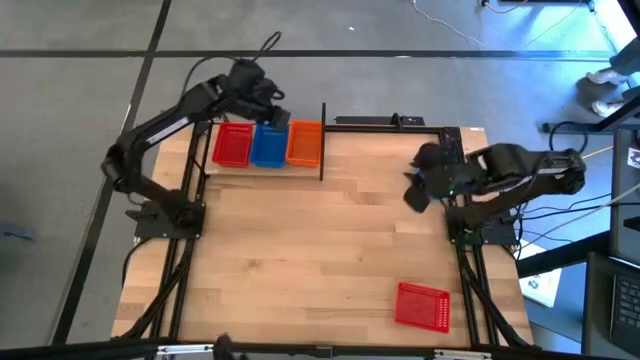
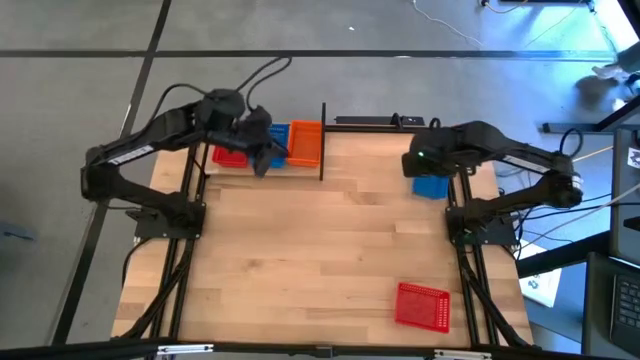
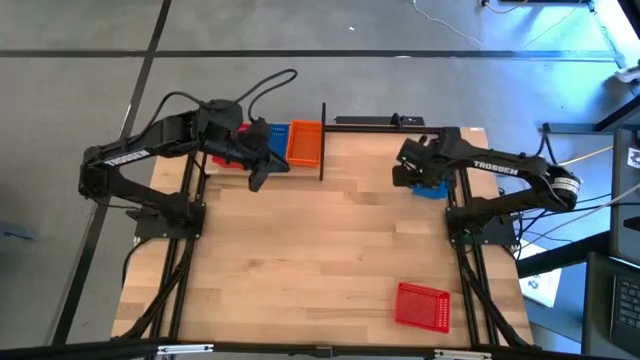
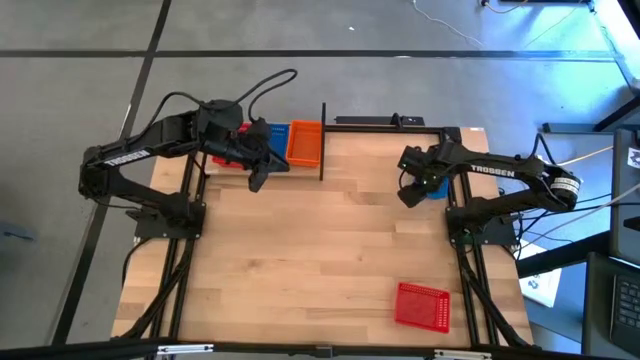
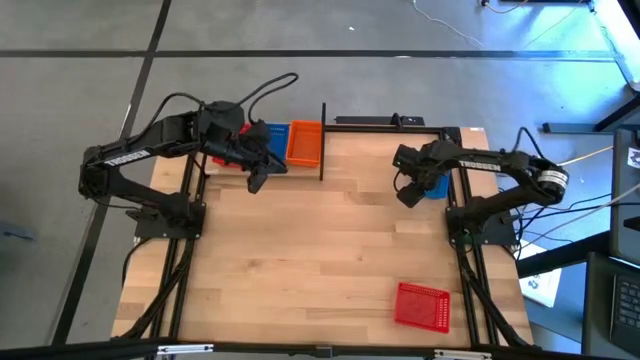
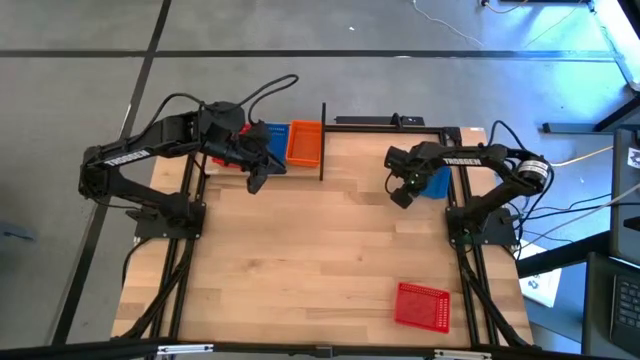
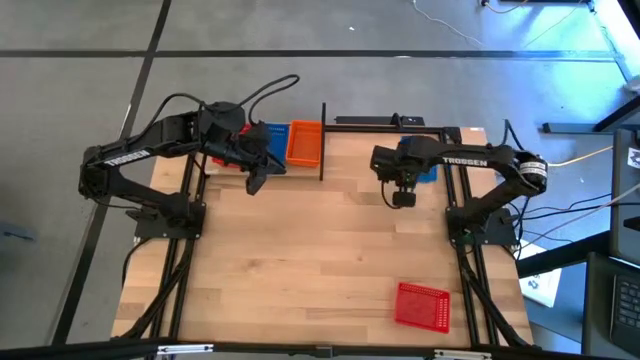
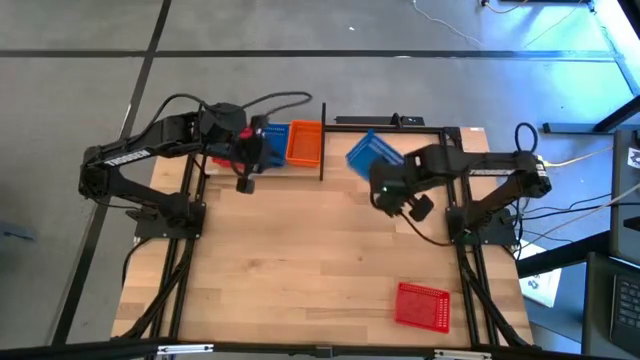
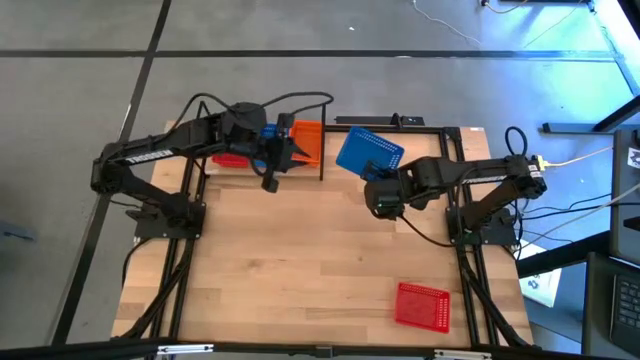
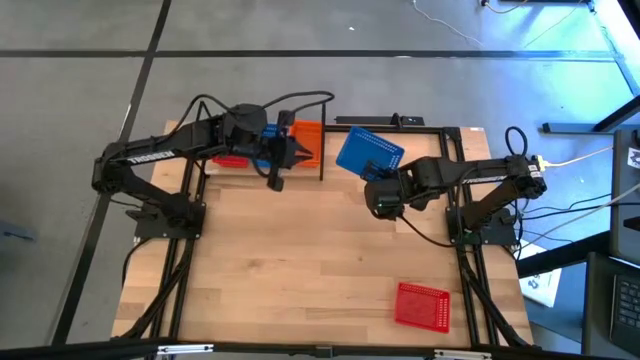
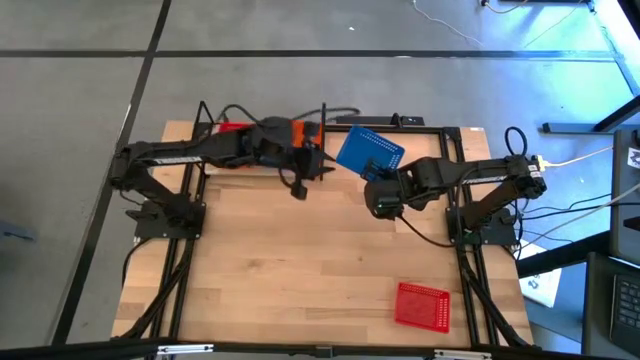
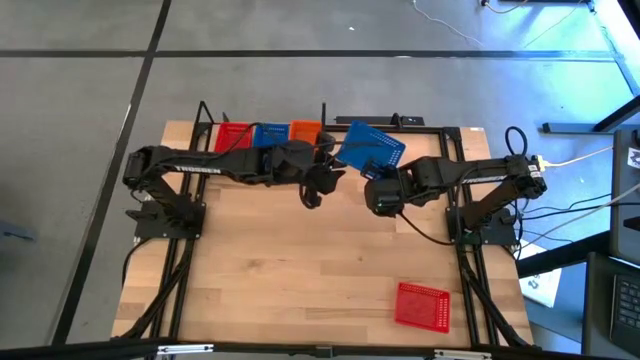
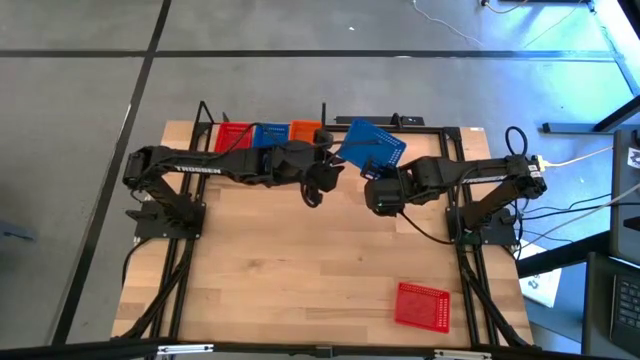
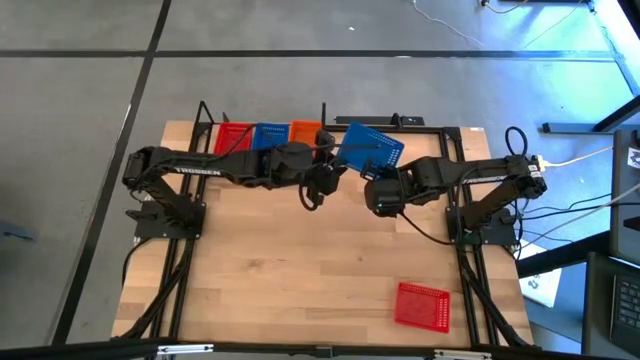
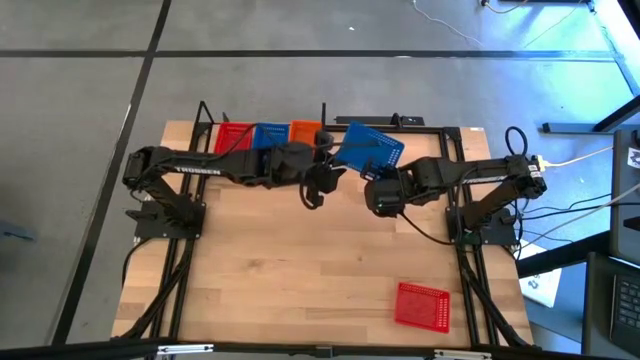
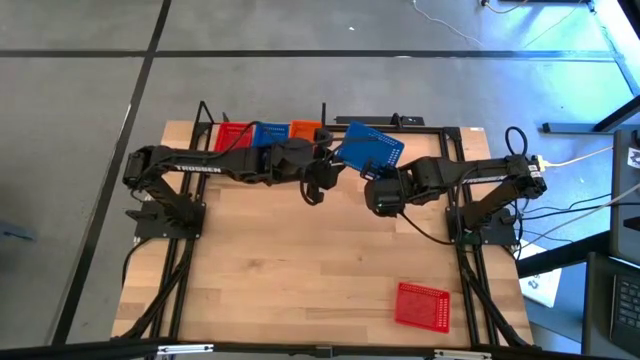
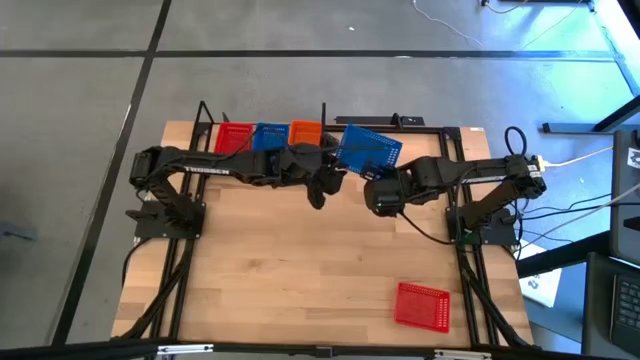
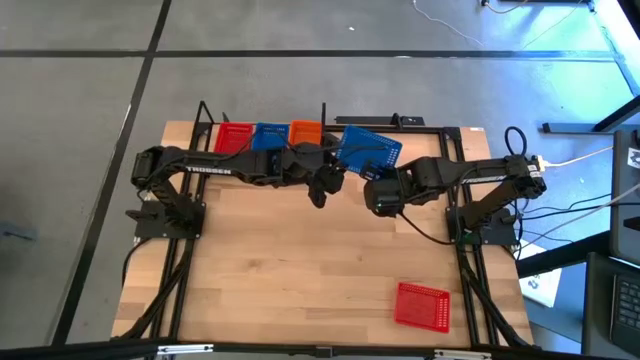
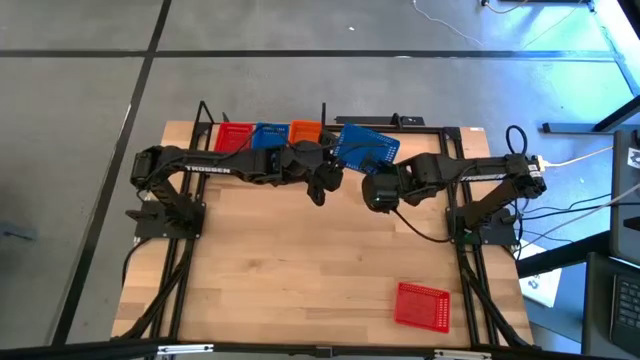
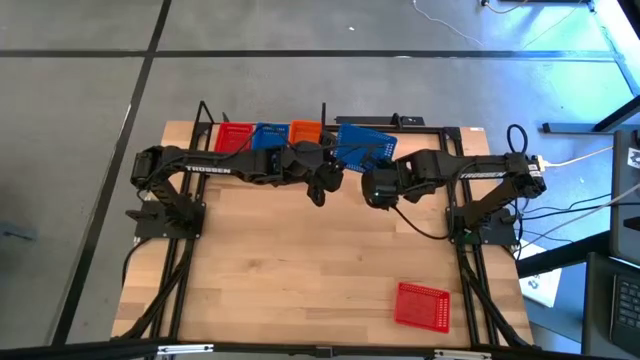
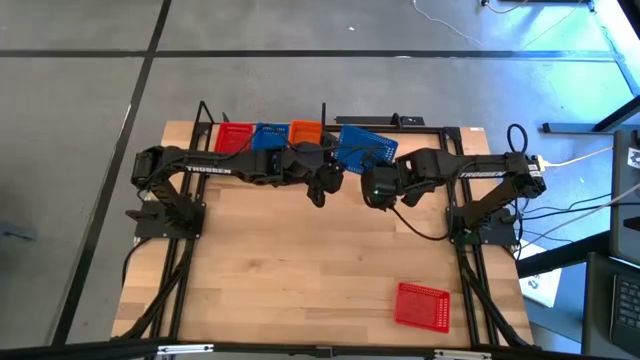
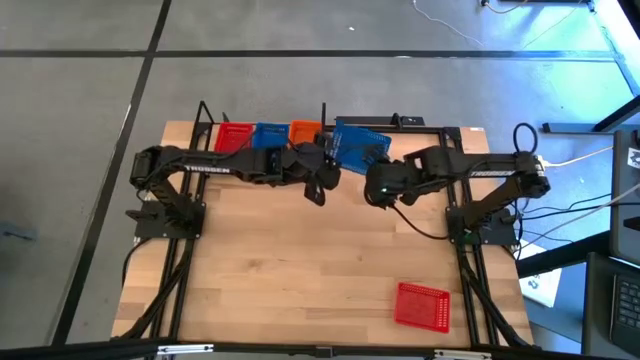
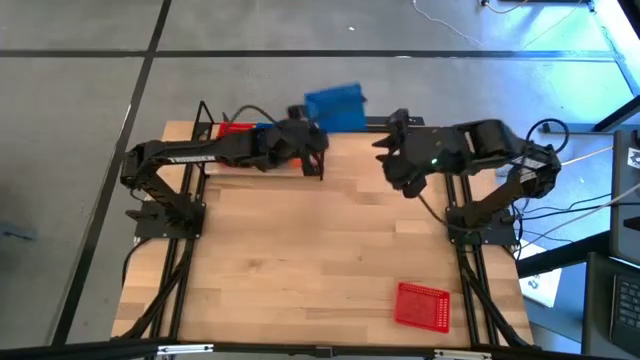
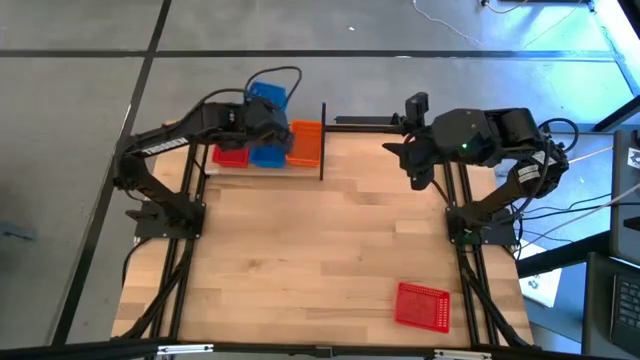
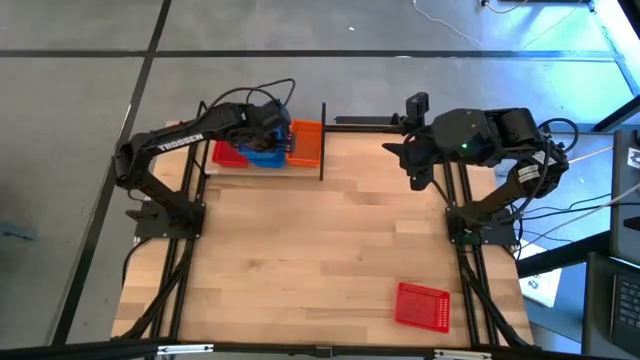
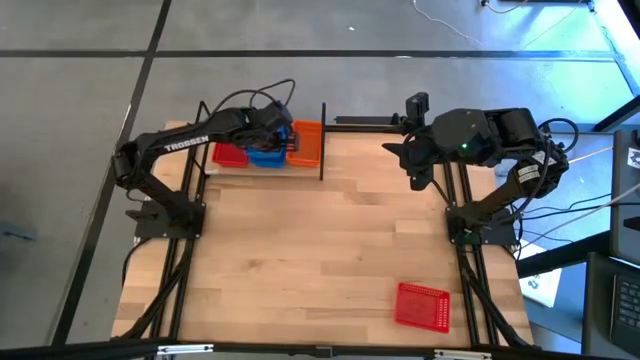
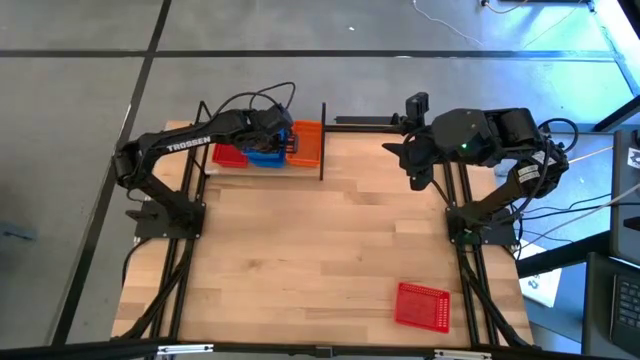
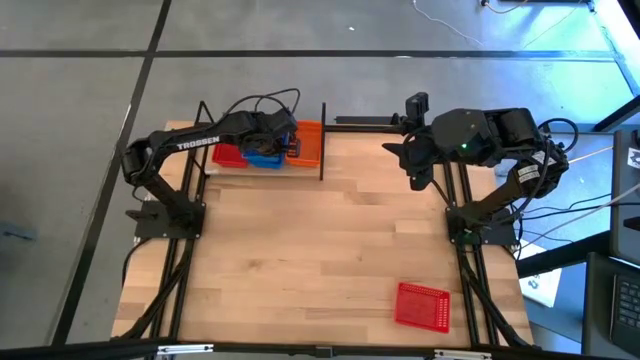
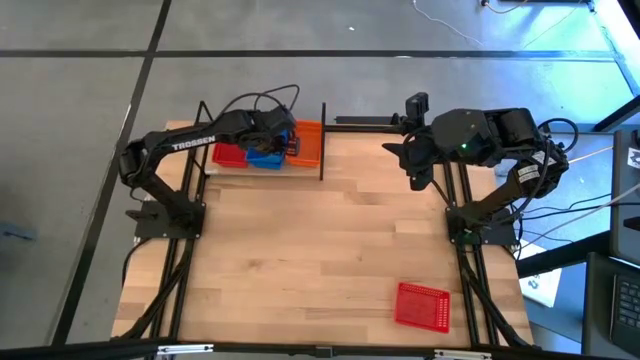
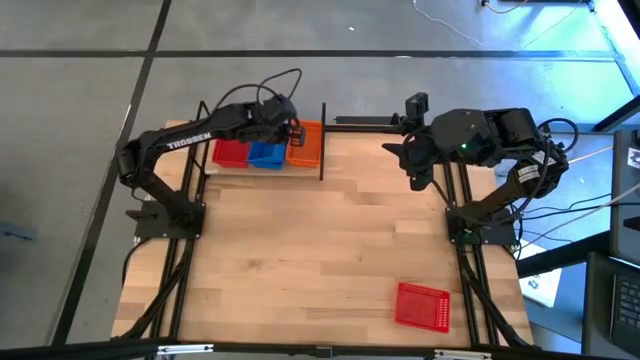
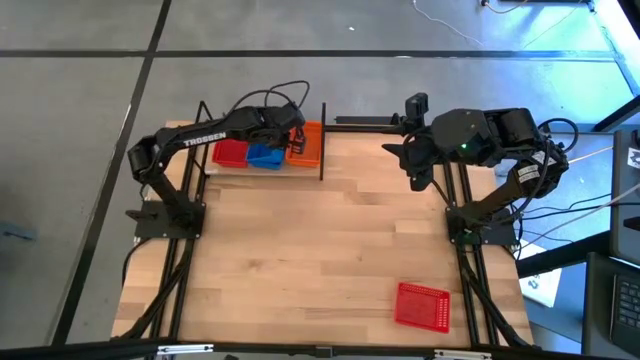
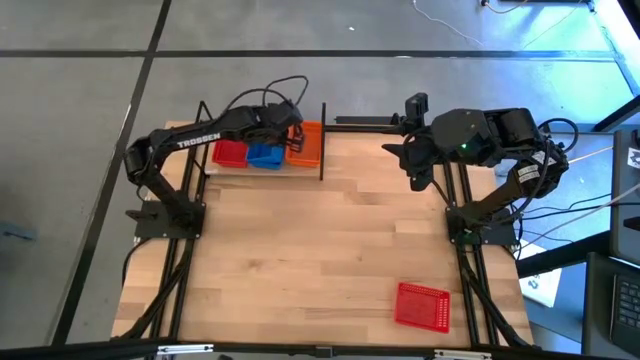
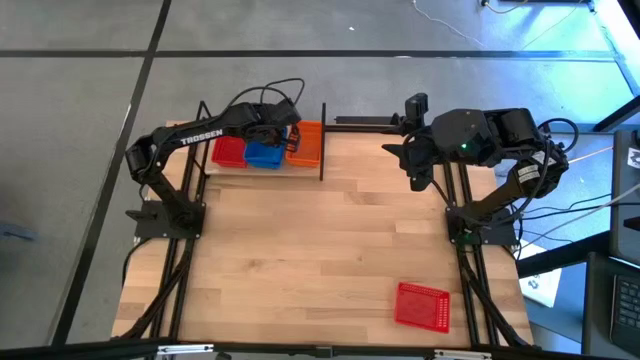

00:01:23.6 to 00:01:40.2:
Task: Stack baskets on shelf by color
Stack the blue bin on the blue bins on the shelf

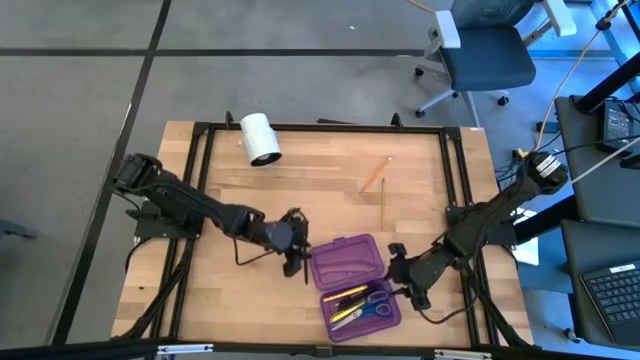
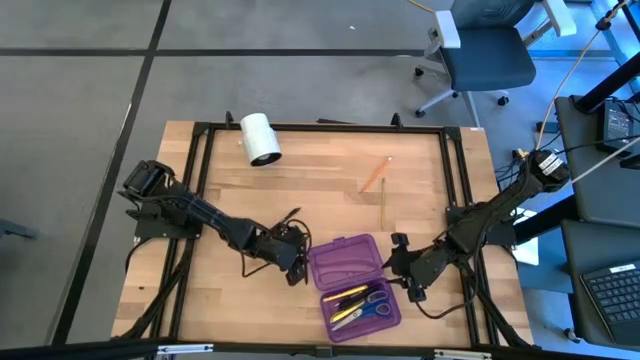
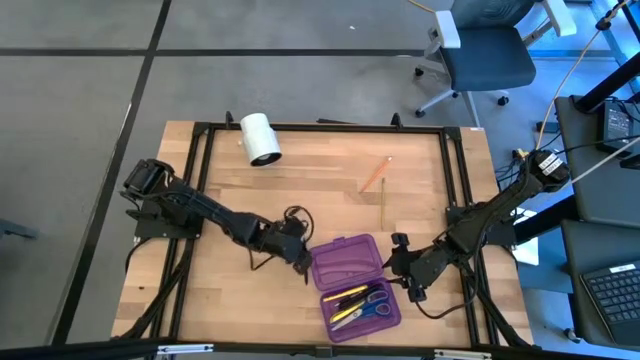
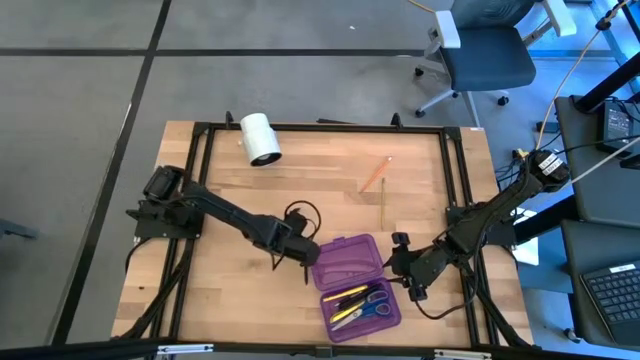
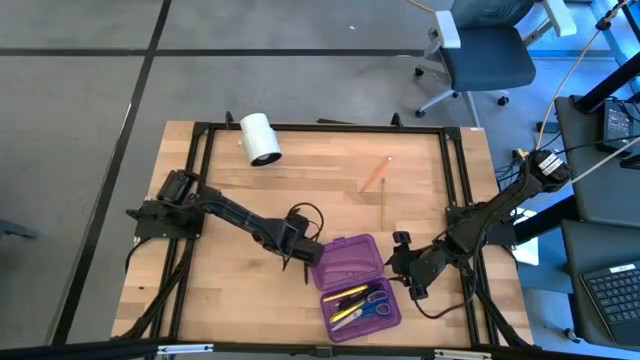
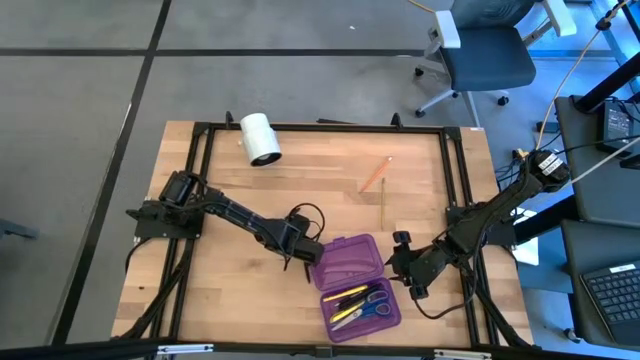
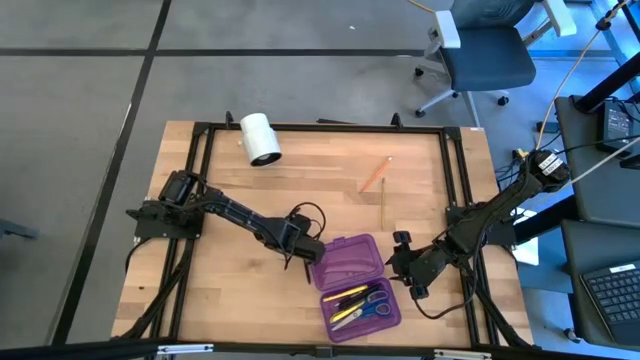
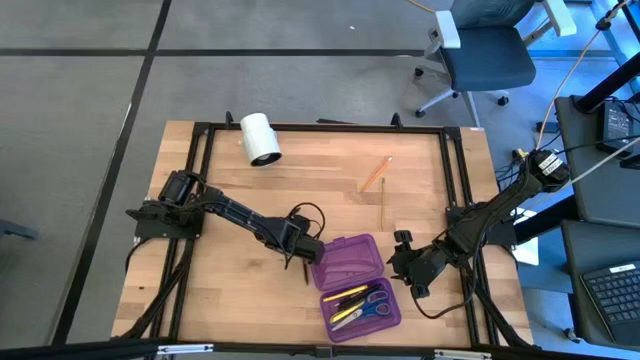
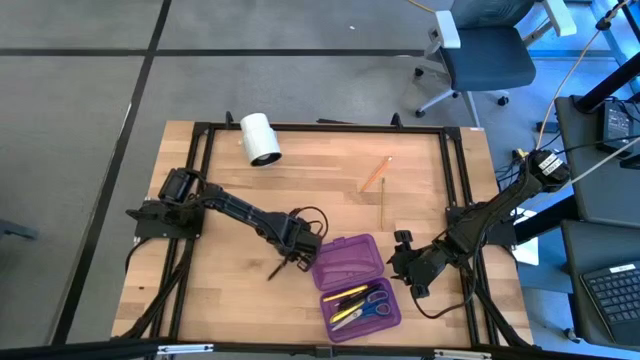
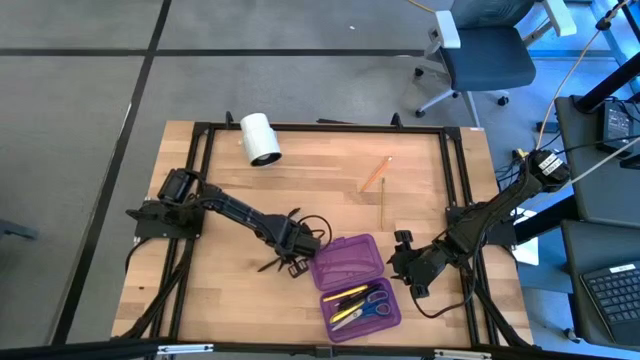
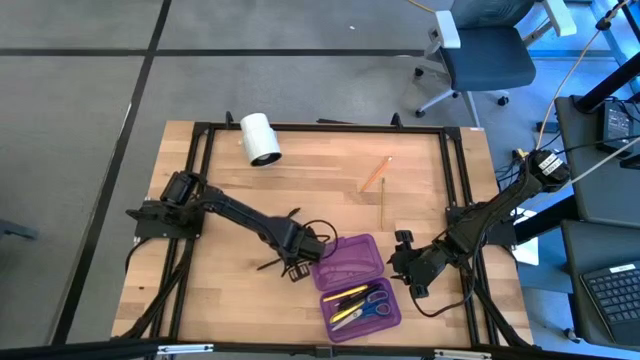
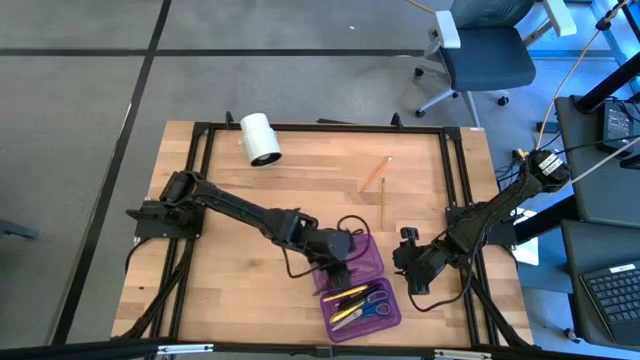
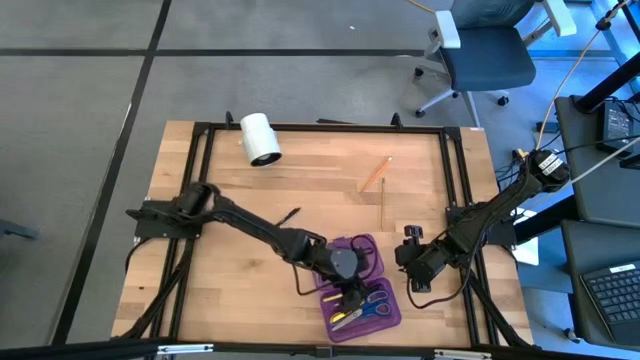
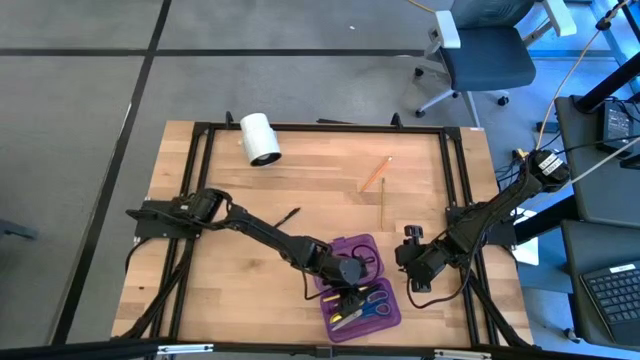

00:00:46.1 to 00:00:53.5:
Task: Pick & place school supplies into a supply box
Put the bottom black pen into the purple supply box
